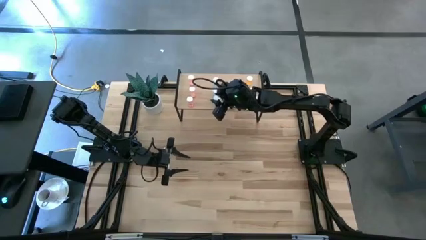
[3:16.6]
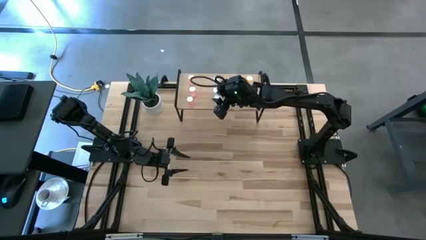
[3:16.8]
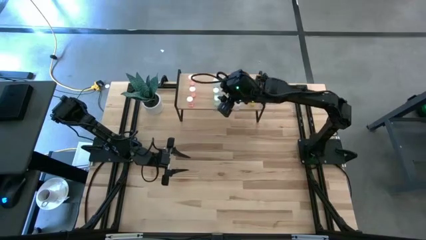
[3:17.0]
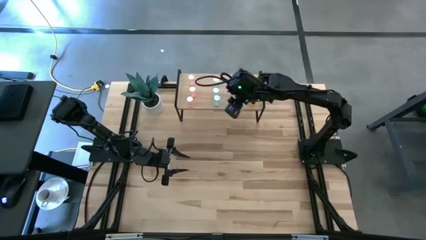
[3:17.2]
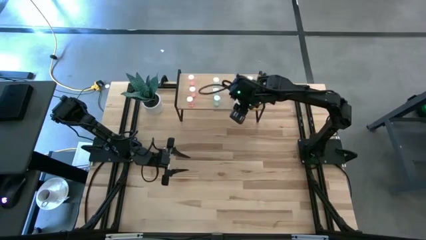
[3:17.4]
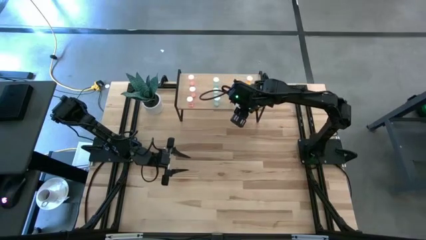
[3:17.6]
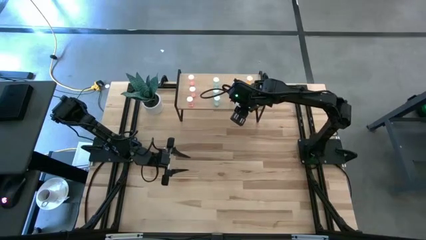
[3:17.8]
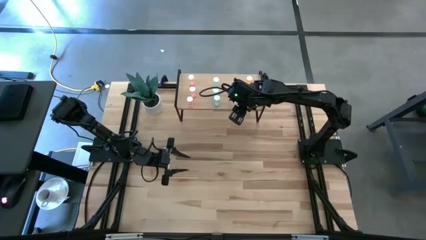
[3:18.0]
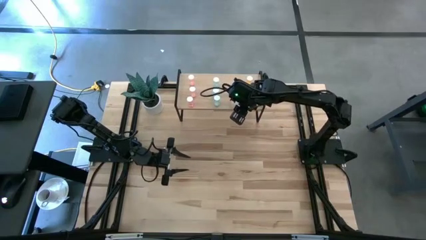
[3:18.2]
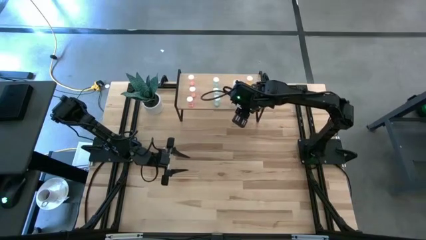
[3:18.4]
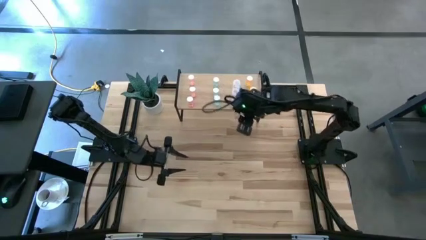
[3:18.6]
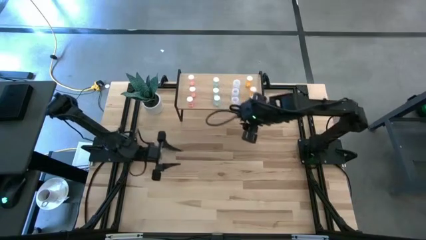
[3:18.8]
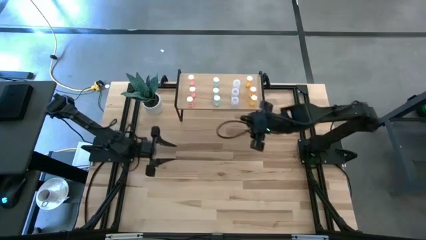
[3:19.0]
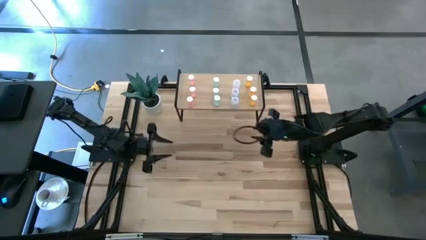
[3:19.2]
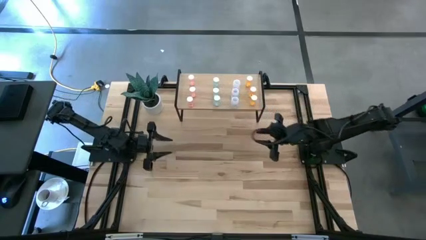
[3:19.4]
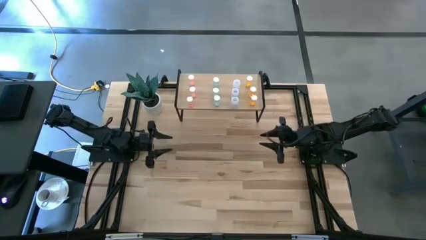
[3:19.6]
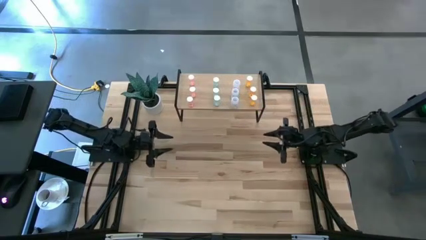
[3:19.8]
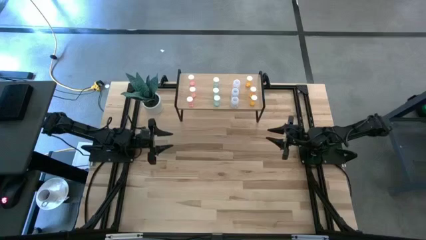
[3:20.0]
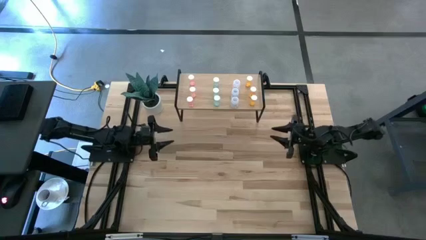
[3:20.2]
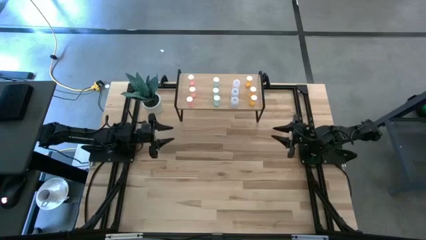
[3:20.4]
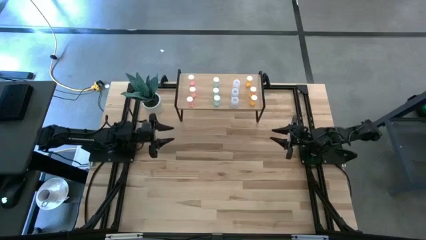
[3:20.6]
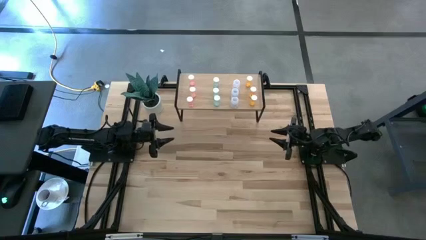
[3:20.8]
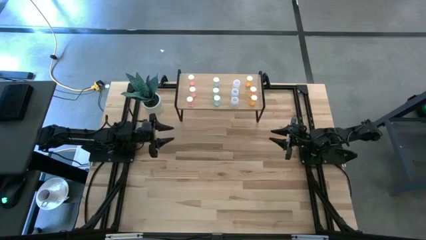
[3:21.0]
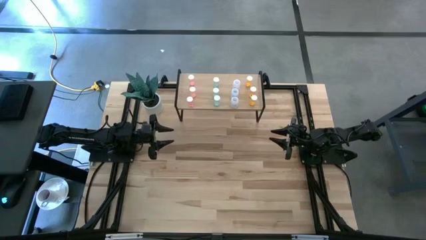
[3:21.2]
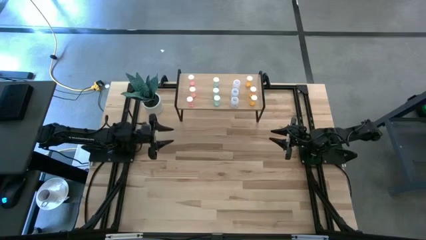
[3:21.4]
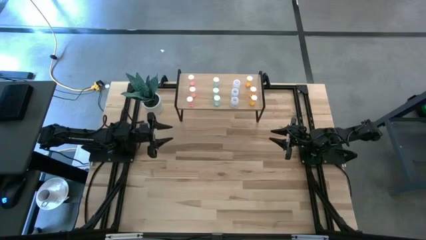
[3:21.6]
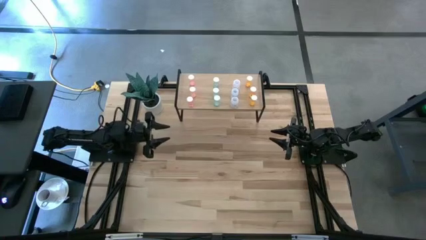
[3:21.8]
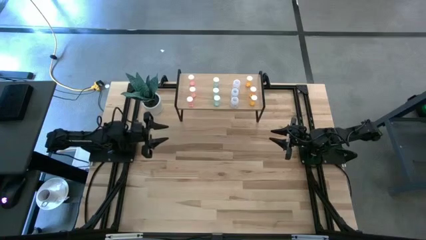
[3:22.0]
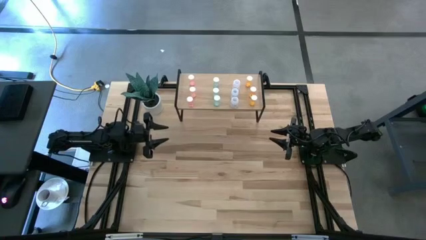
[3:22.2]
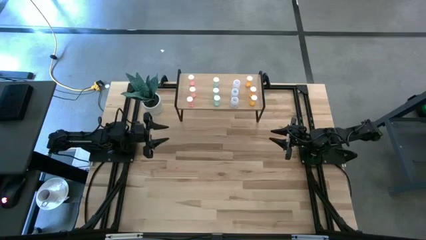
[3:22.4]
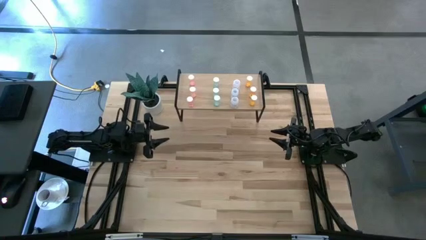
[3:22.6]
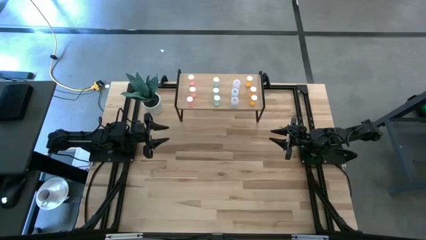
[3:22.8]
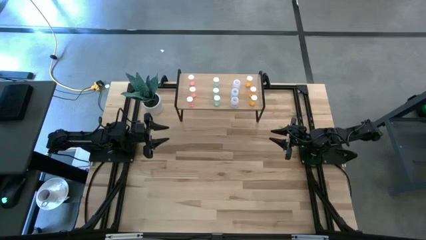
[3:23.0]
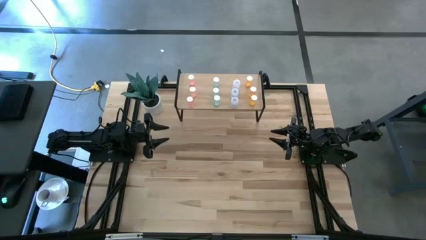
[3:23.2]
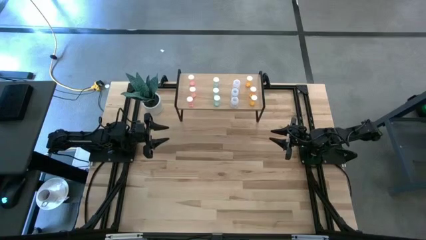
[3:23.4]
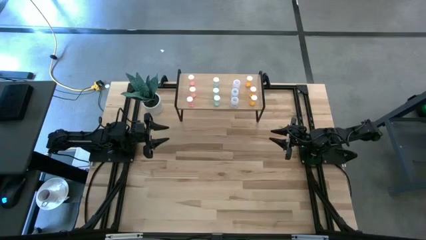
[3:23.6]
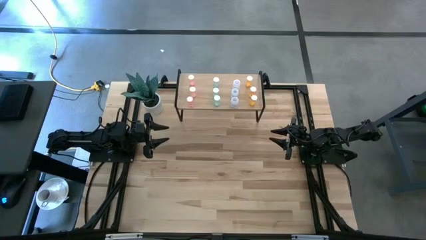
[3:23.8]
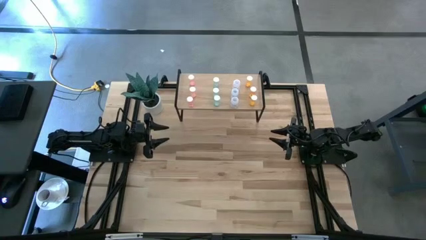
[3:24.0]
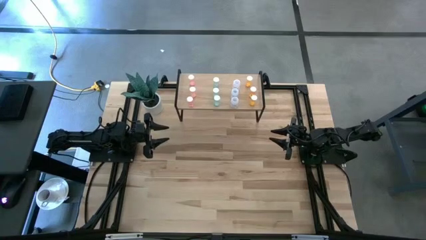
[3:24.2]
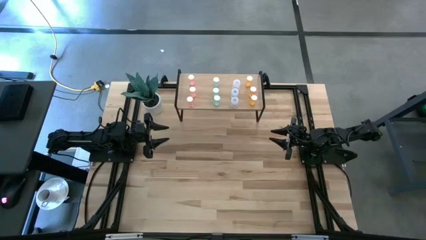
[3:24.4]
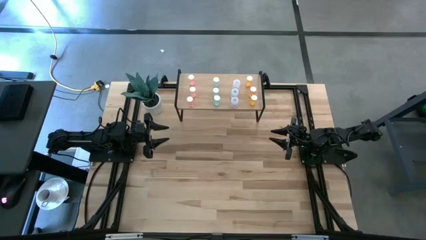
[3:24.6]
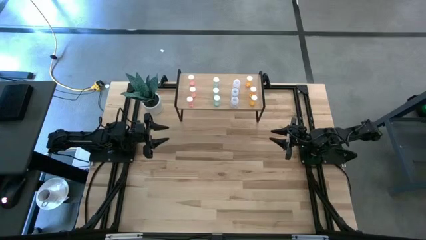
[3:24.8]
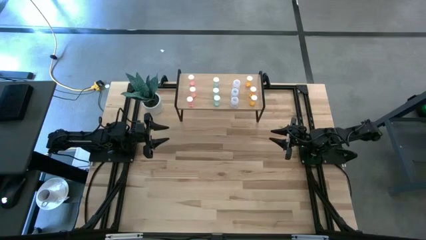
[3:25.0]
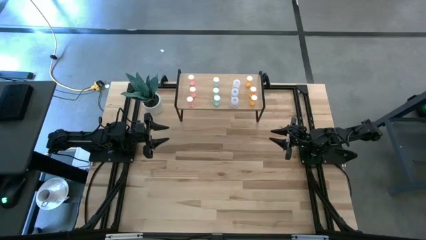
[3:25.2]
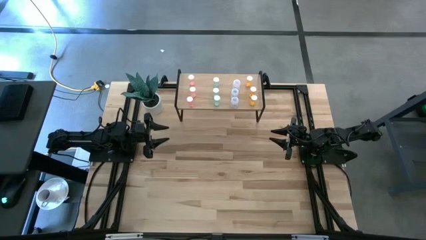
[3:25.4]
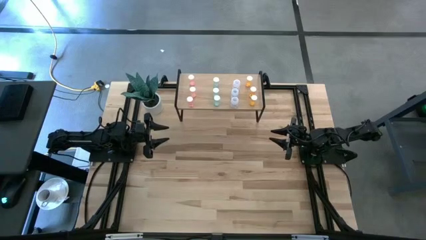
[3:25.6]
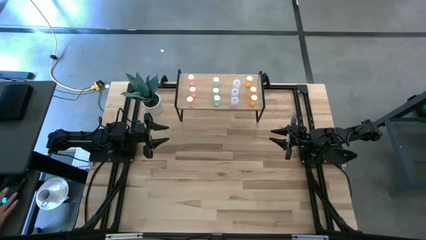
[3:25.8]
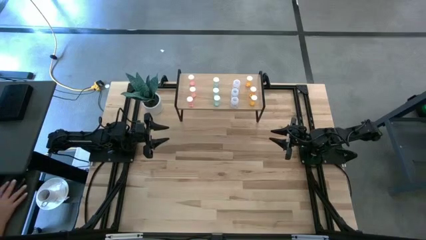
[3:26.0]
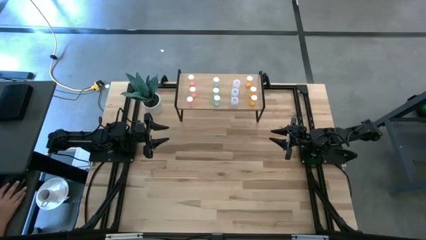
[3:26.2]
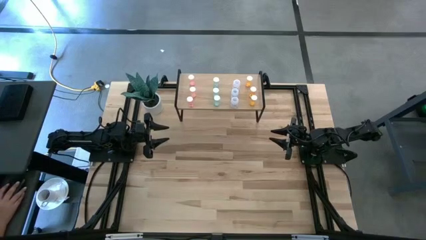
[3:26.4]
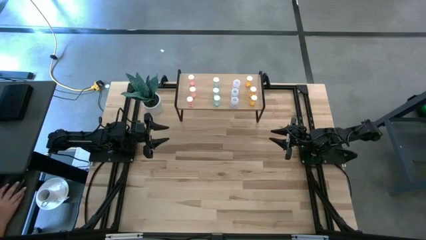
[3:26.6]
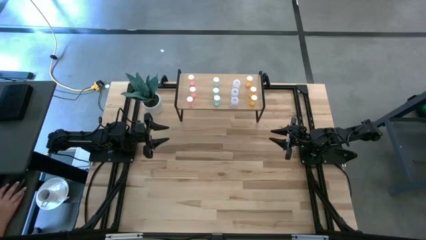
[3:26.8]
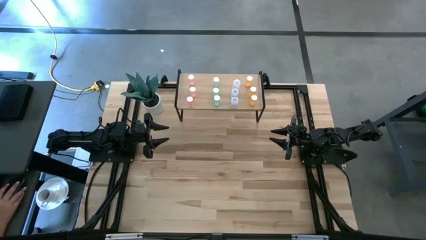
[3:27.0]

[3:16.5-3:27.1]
Task: Pick and place medicine bottles onto shelf by color
Return to Home Position
